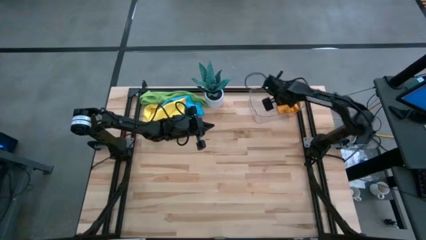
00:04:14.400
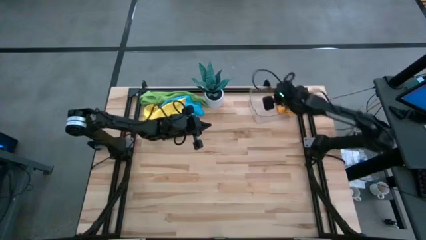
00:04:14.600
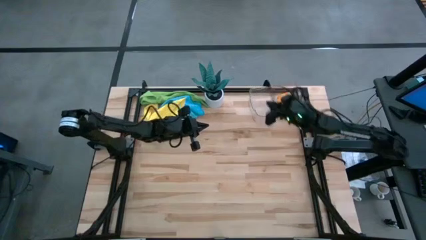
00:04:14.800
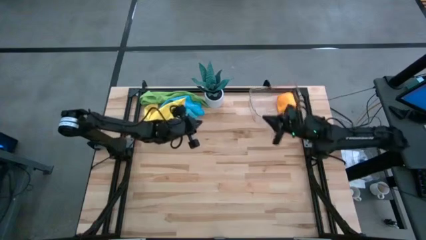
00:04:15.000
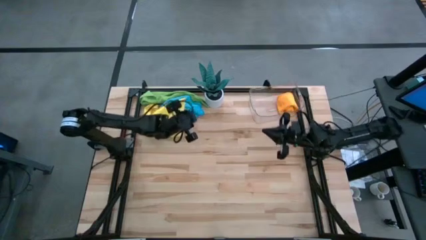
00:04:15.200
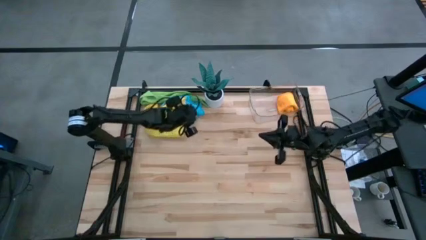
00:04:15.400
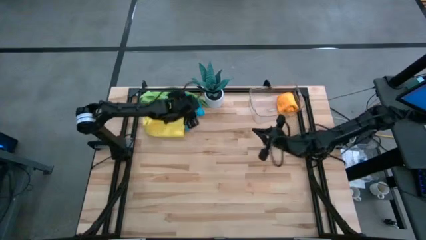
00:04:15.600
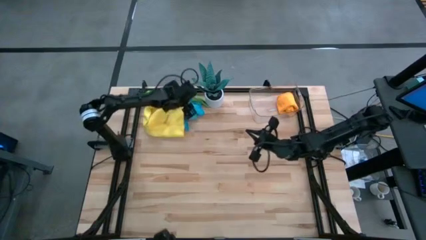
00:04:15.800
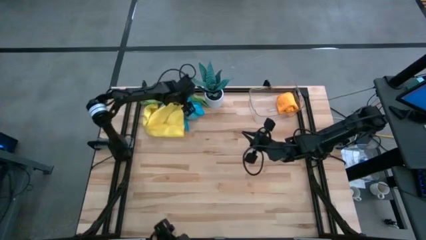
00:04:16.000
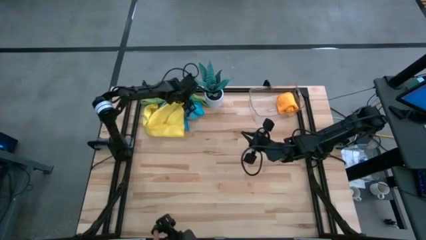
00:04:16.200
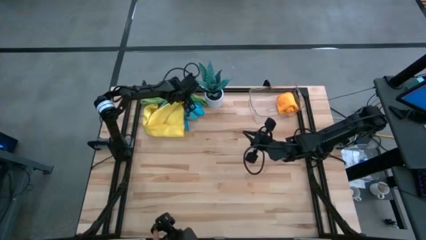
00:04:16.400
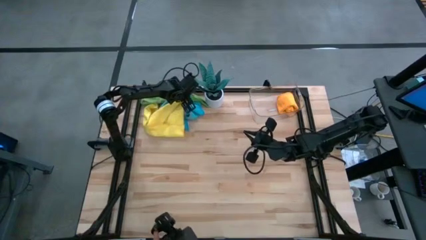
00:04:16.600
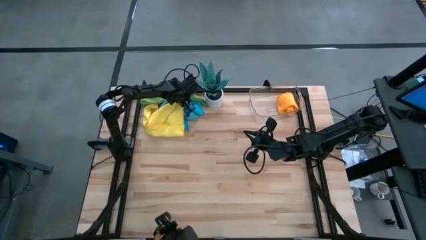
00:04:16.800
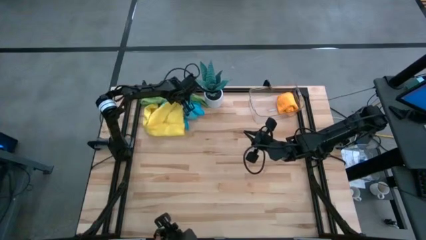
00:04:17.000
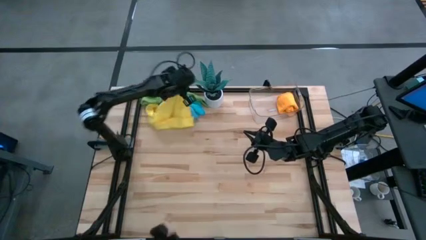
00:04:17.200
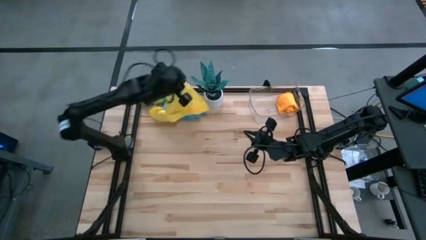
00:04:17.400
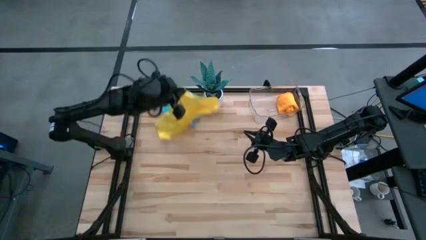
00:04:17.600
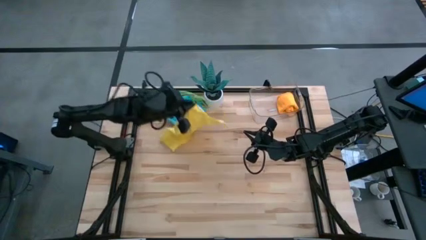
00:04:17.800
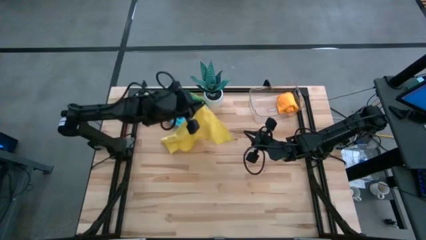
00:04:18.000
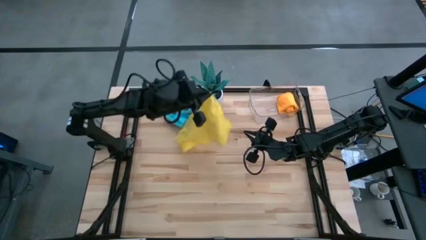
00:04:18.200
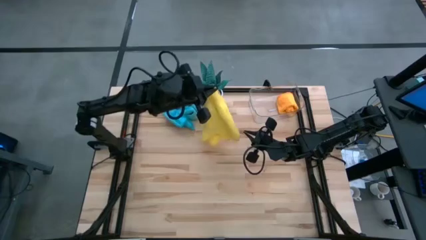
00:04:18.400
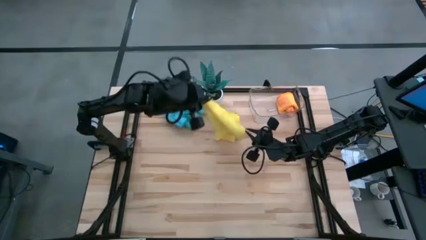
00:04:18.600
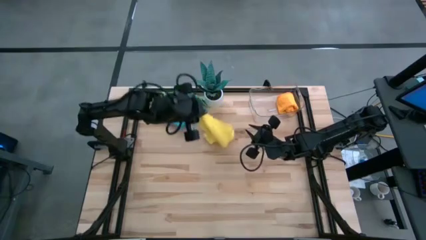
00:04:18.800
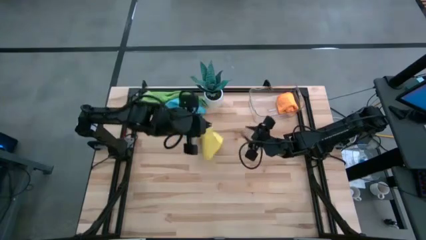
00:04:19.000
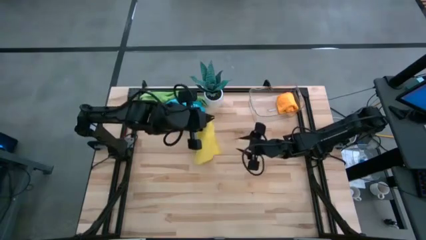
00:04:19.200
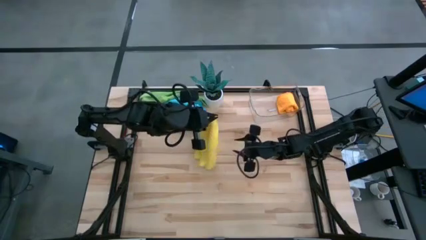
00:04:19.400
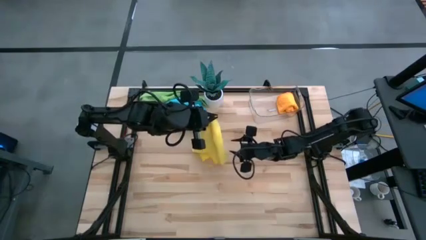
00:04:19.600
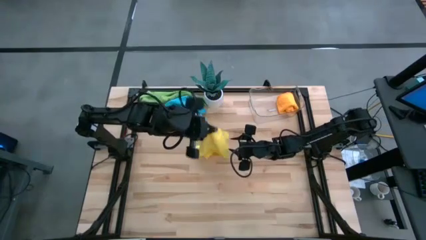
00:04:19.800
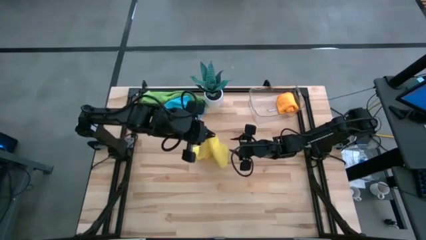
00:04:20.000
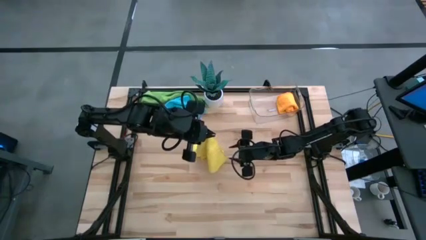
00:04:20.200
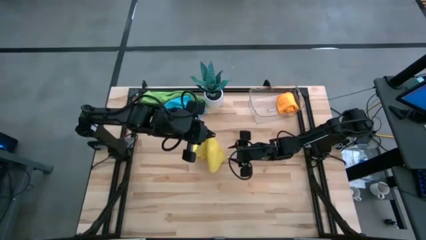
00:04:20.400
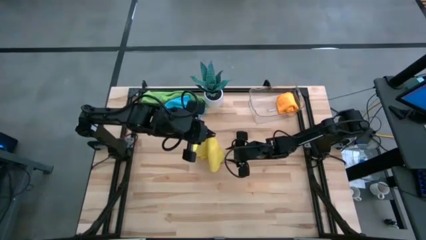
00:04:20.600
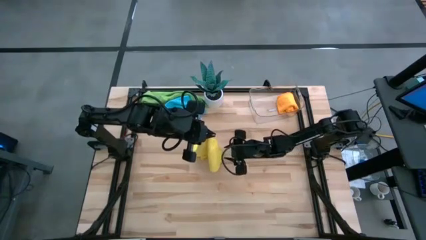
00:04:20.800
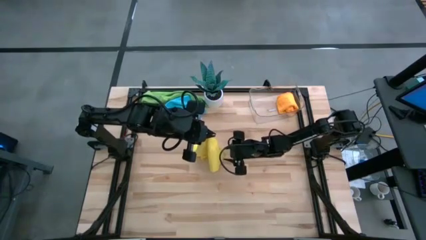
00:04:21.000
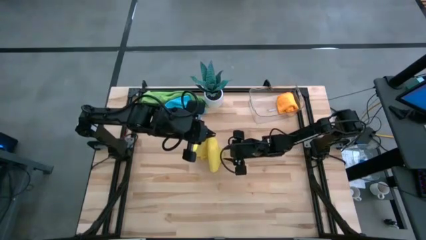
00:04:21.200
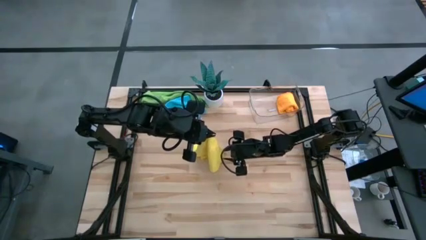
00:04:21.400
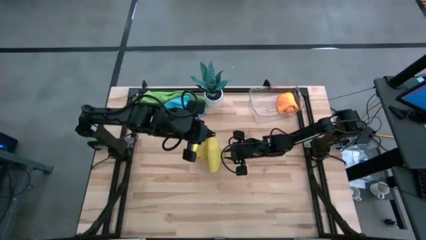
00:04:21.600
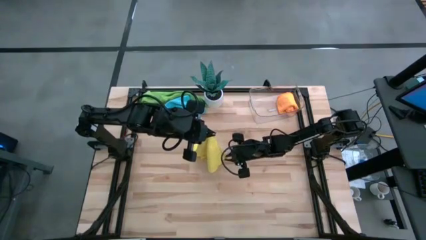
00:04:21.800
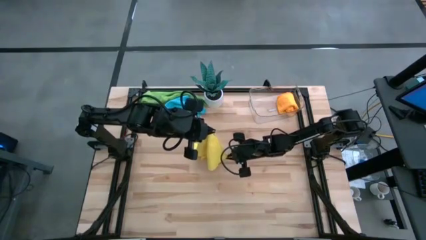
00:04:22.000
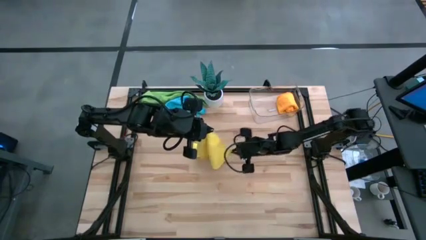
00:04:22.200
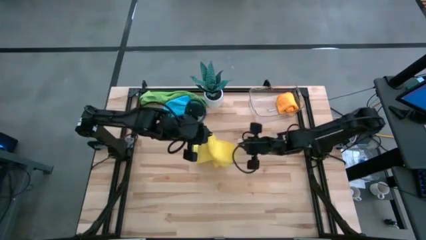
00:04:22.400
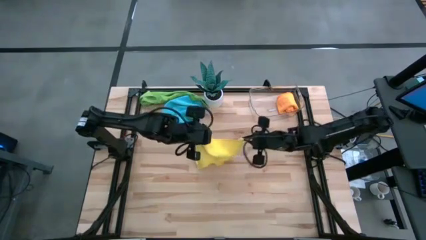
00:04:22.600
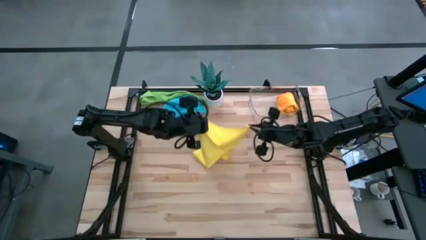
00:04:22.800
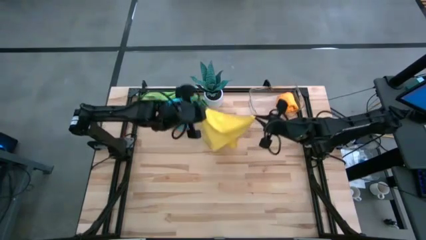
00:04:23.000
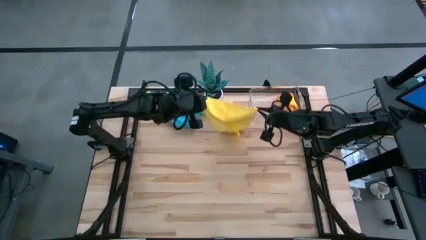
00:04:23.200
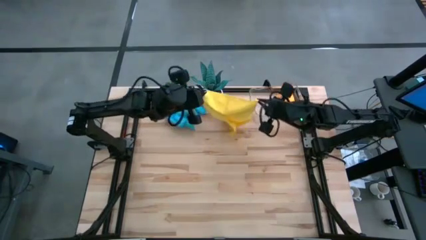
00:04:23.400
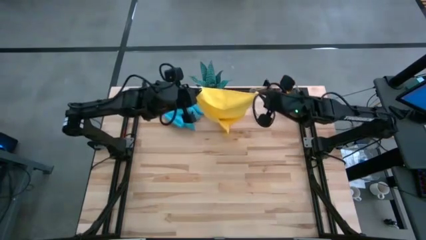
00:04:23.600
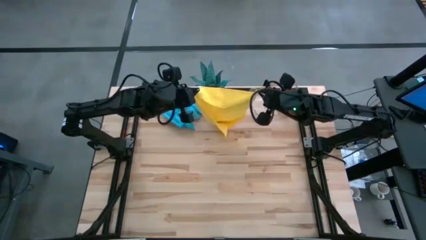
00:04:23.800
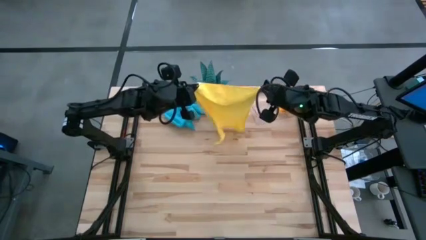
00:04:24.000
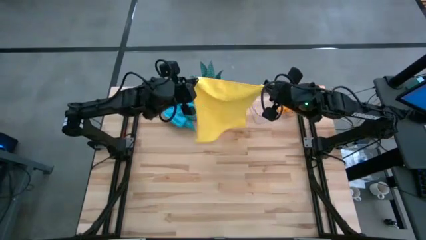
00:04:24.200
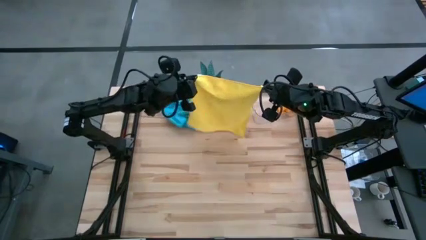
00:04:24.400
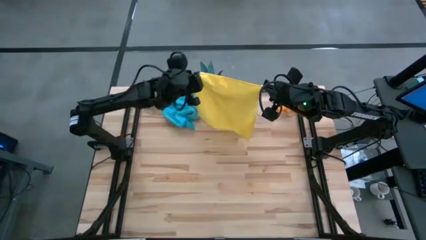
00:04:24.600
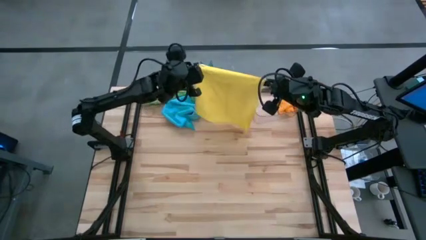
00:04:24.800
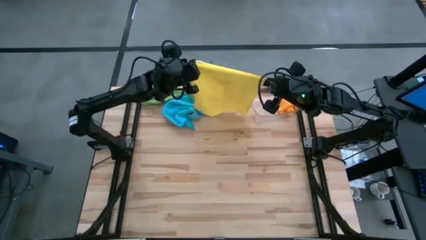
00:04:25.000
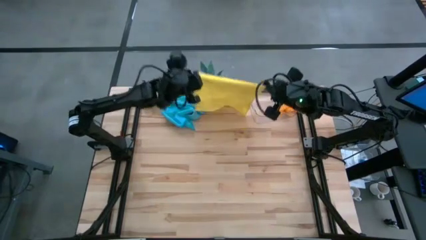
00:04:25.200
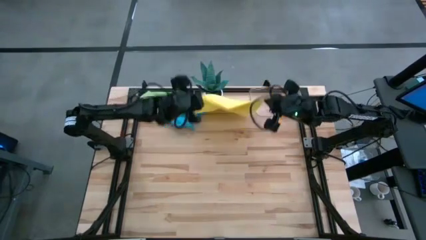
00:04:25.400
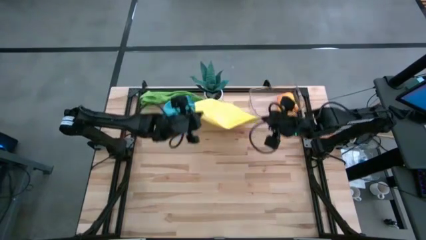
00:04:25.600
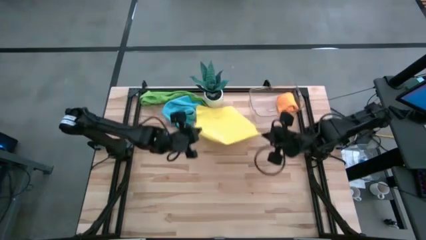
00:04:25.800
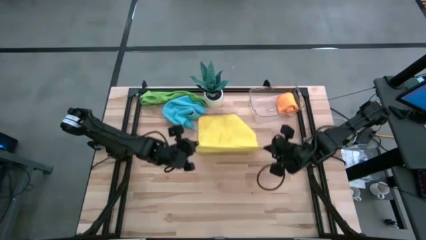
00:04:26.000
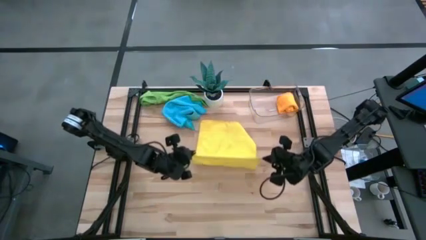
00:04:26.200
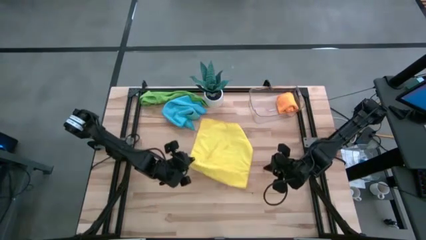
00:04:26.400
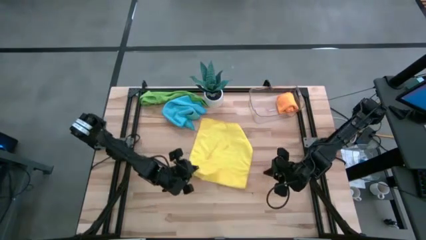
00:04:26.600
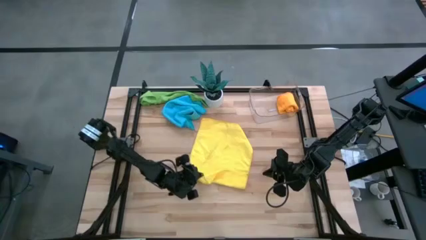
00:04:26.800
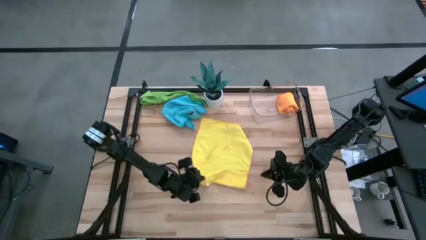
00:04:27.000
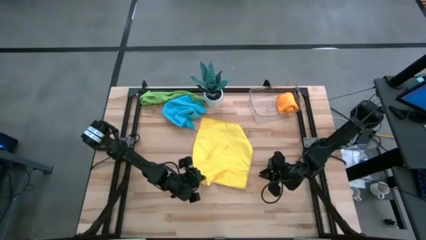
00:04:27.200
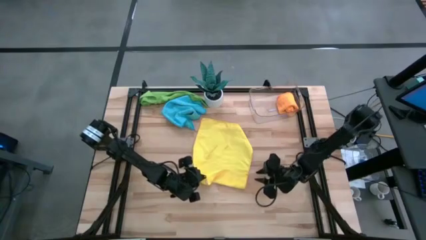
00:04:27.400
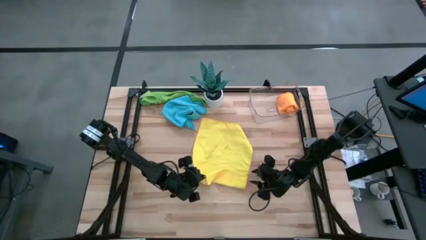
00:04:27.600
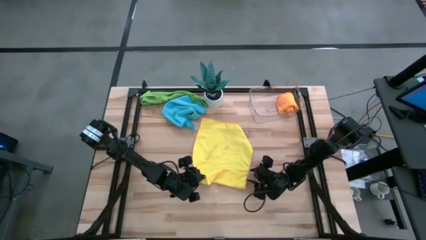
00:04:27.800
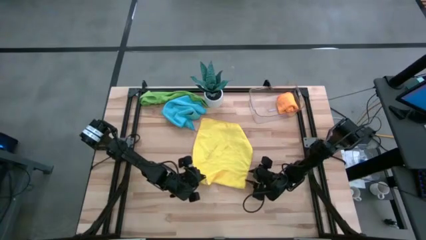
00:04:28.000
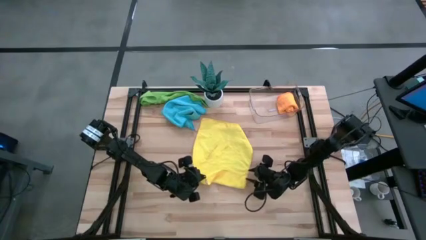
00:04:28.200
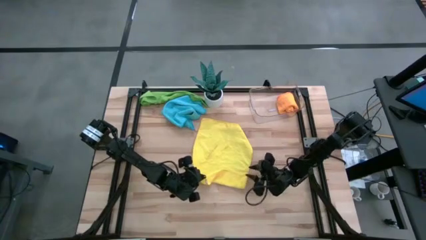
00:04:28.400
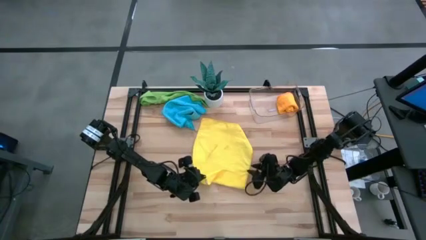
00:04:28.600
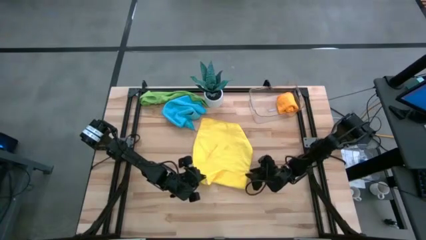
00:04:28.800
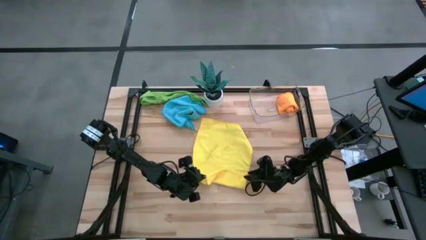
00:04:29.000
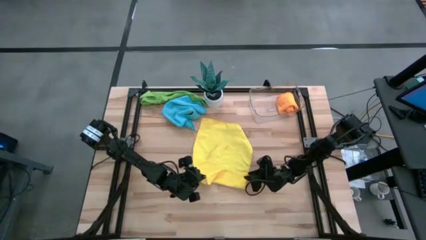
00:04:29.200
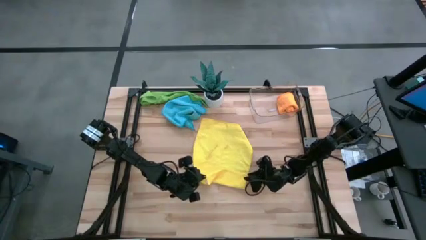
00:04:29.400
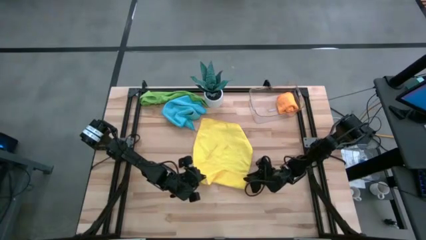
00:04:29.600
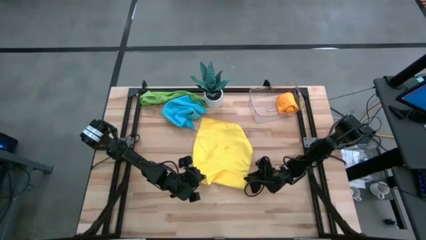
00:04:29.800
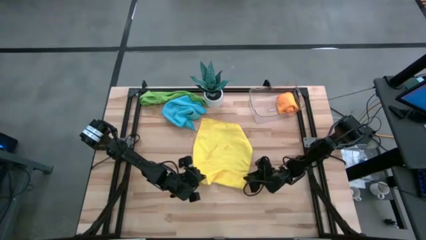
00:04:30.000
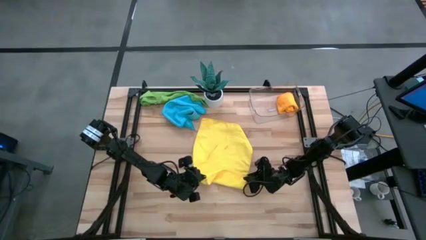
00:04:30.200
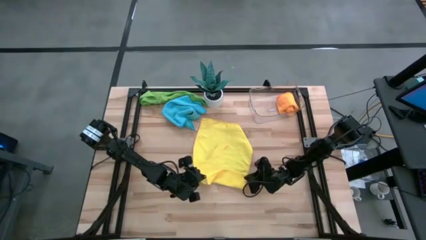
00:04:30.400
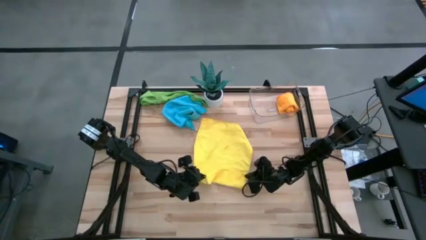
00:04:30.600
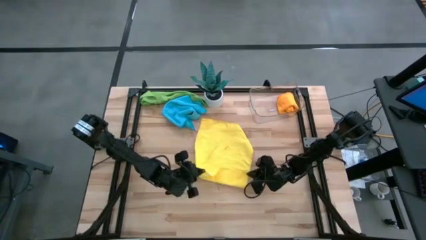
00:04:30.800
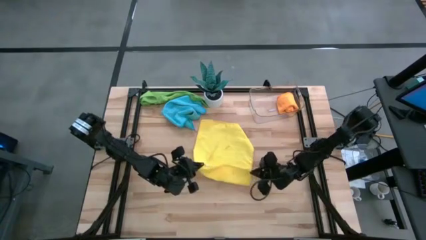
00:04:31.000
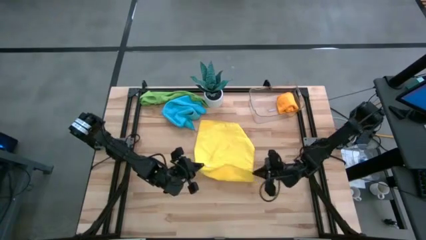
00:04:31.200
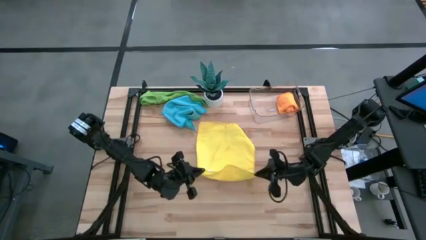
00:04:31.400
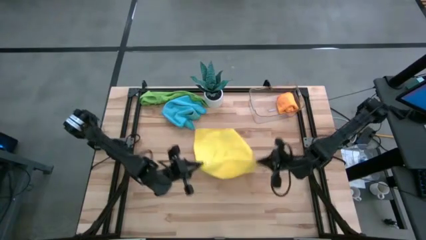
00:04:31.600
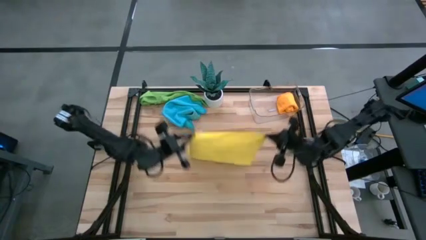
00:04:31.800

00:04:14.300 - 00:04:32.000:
Task: Roll microfiber towels into tight, uniform cylinder then place into a basket
Fold the yellow microfiber cloth
